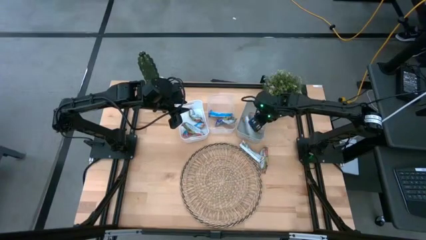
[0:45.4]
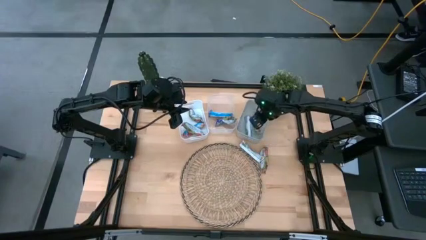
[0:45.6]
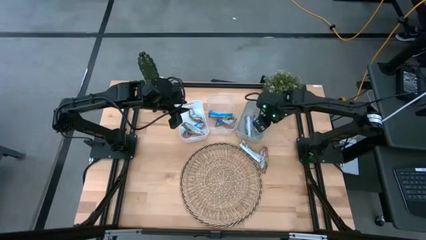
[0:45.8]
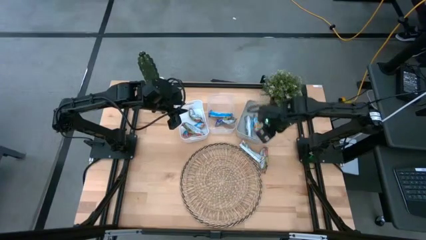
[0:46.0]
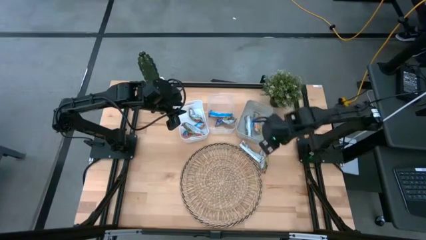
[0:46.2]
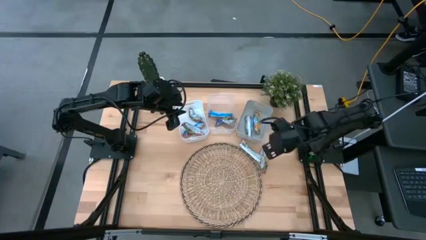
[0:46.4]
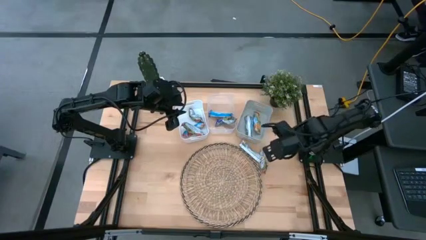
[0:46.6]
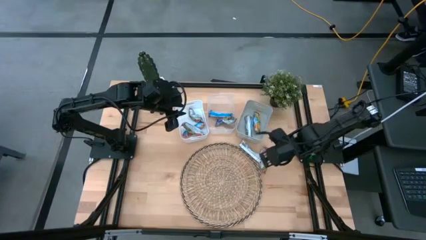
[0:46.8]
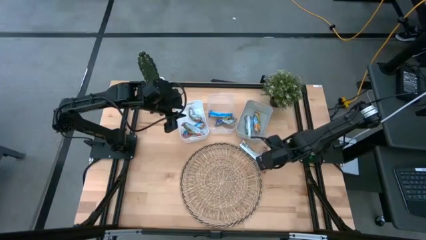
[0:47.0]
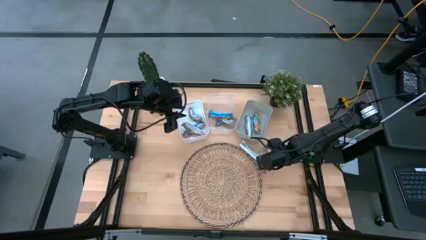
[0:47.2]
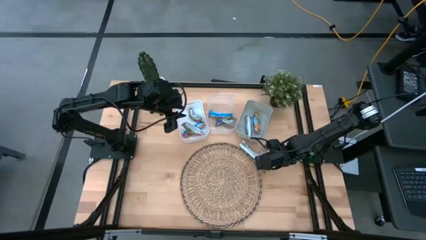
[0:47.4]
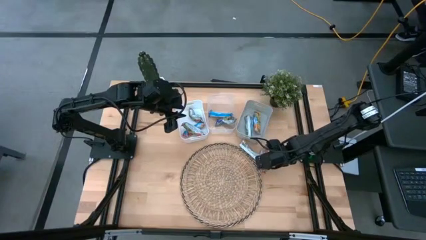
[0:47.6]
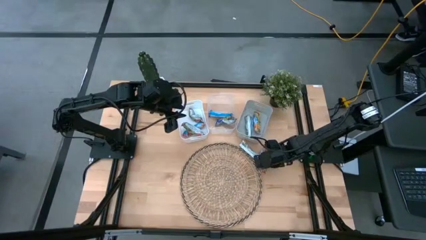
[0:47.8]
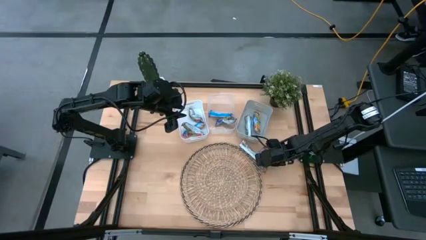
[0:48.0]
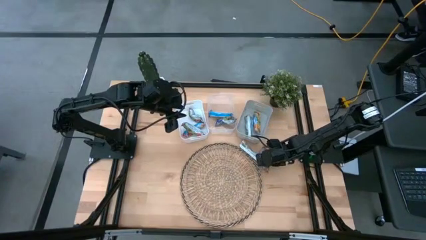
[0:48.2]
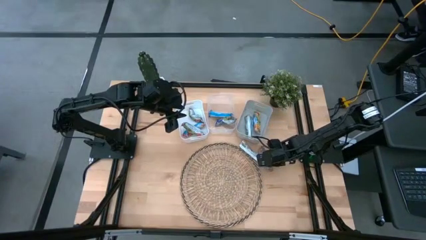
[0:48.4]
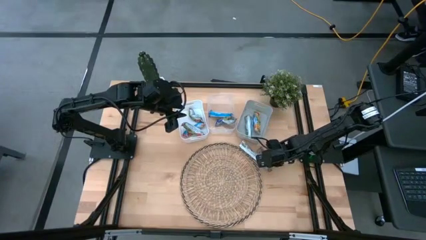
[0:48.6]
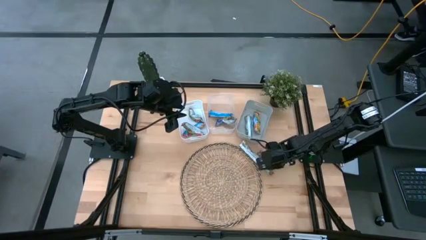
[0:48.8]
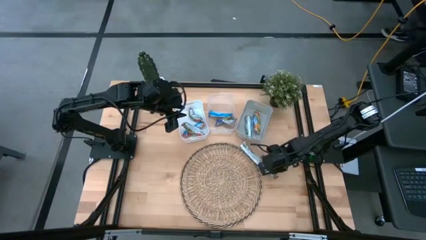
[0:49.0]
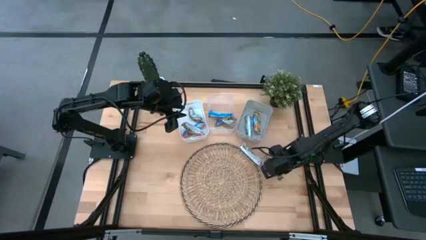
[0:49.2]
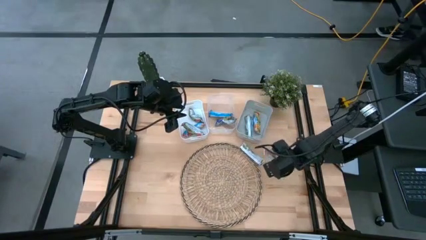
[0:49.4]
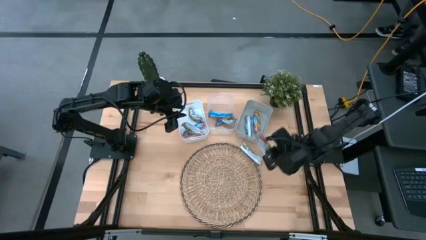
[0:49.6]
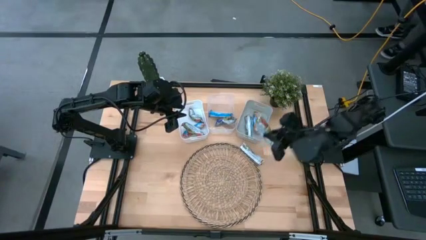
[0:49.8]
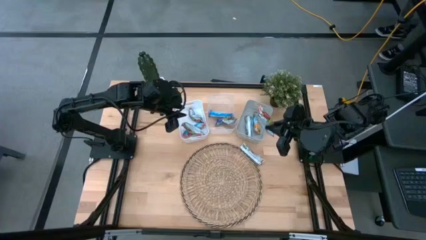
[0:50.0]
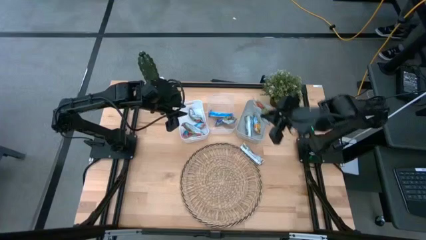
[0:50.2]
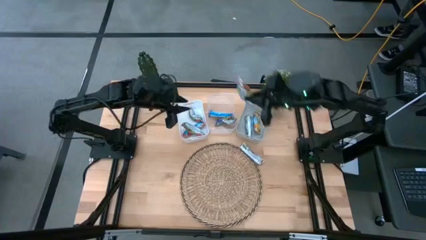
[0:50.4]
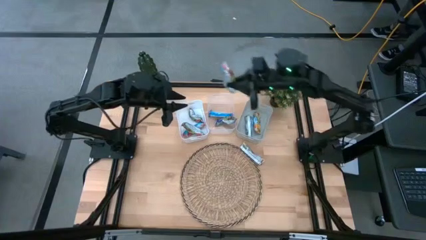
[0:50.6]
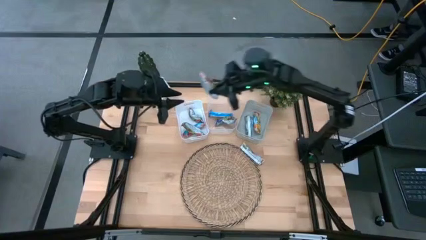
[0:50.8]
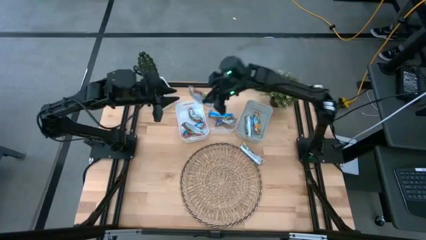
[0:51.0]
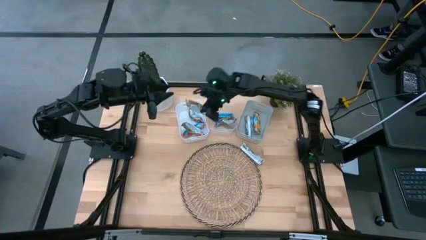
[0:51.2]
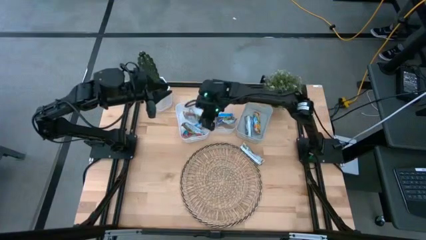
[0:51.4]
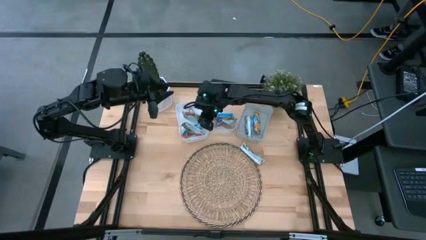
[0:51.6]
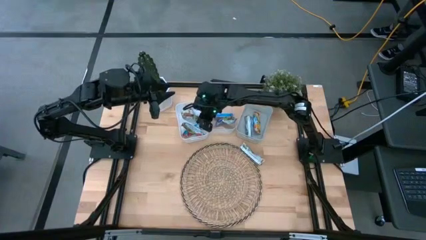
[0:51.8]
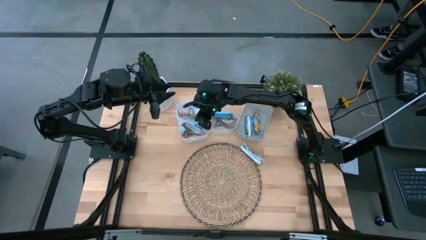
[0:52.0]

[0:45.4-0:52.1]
Task: Pick and place Granola Bars by type
Put the red granola bar into the white bin

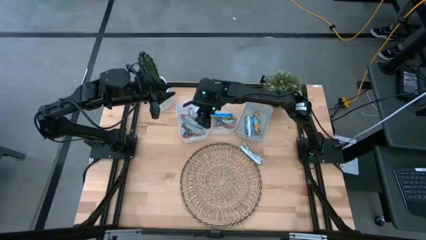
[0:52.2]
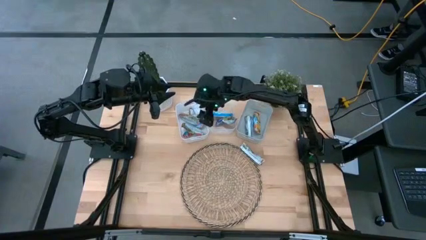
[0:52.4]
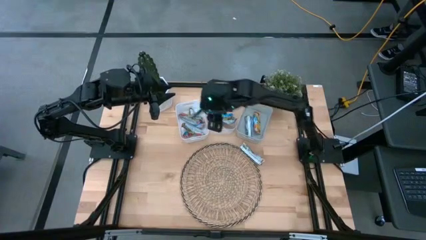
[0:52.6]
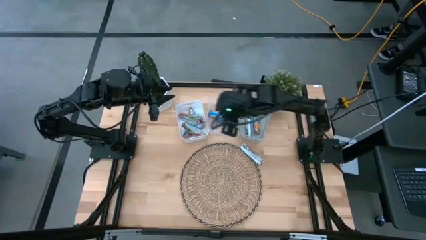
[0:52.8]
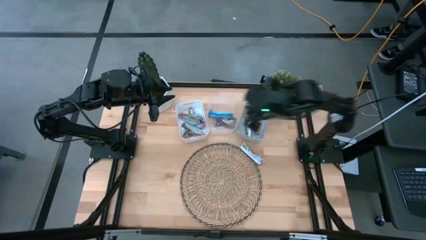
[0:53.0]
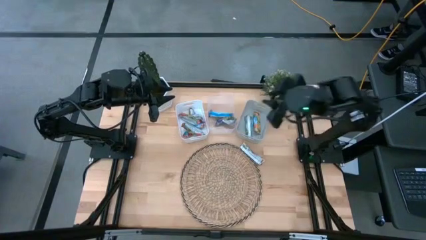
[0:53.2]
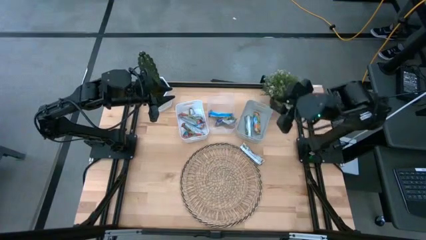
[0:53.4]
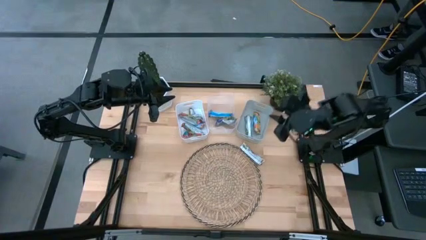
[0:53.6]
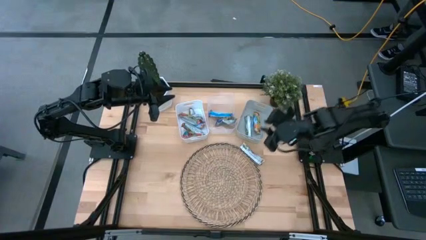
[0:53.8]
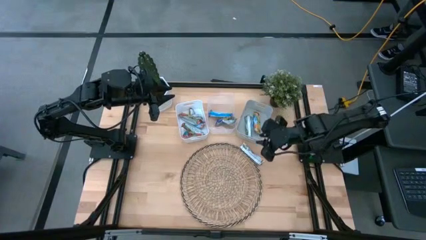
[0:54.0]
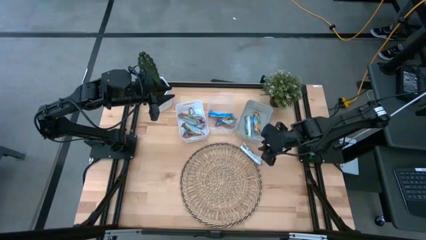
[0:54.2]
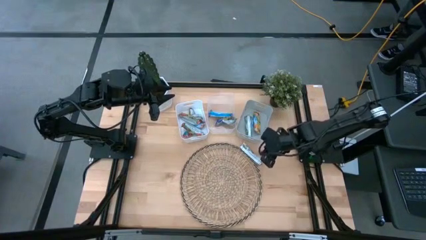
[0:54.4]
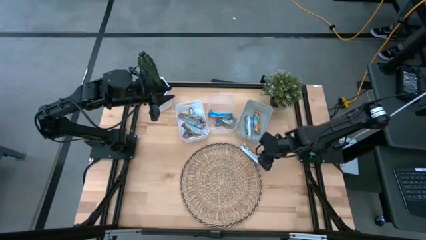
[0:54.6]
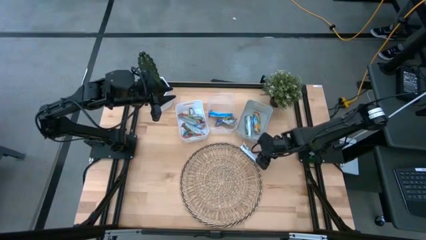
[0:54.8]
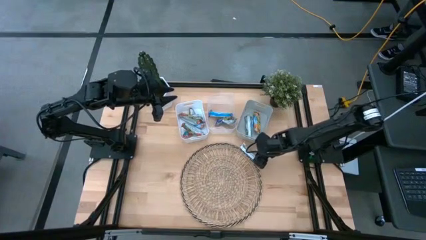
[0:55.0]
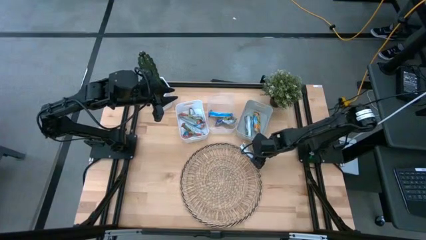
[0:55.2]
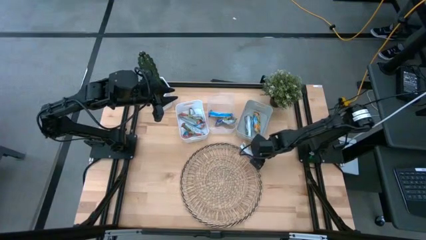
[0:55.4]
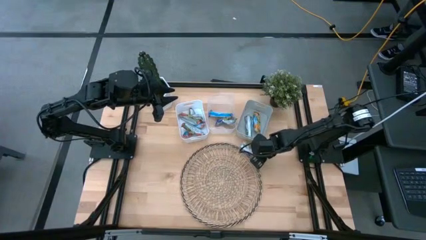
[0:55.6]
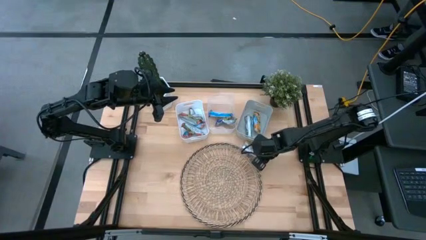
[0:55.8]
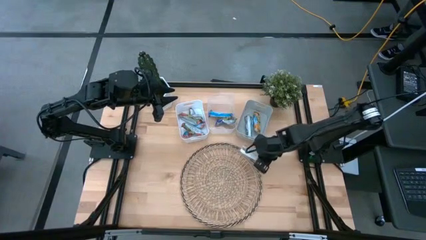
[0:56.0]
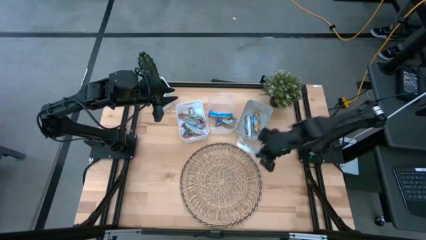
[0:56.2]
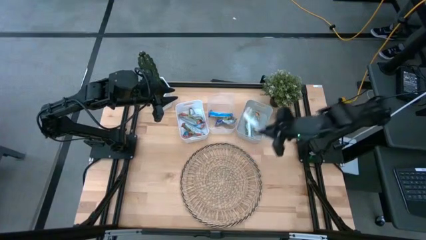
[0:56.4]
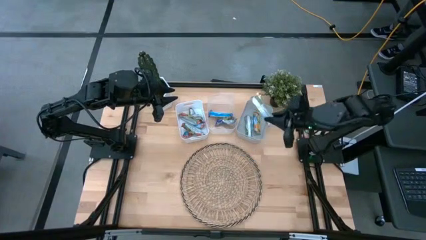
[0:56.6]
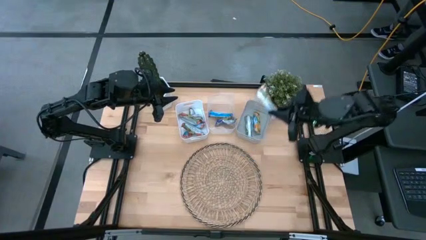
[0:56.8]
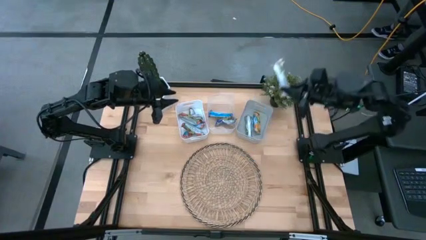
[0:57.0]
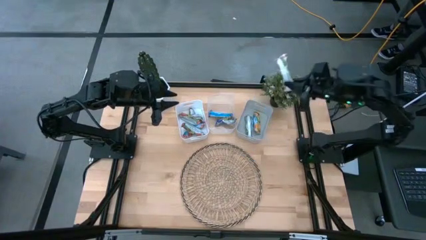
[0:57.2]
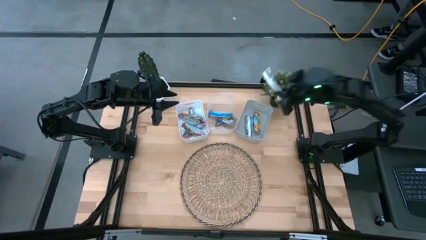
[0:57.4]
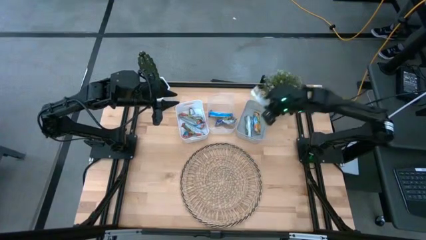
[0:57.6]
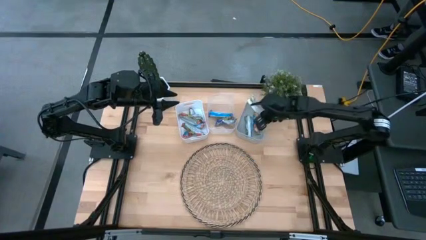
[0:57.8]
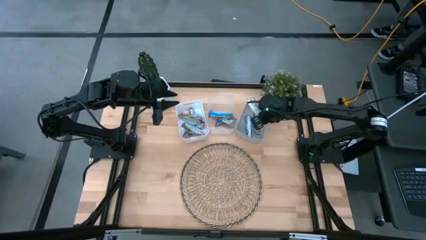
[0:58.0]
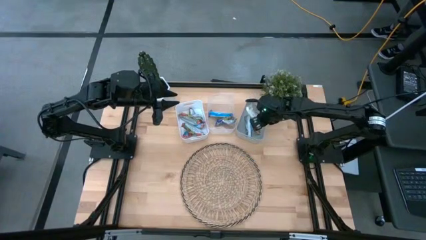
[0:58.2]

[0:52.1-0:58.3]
Put the yellow granola bar into the gray bin

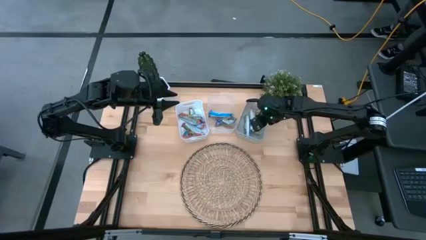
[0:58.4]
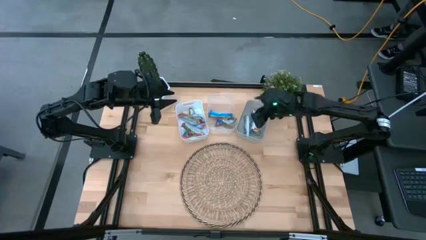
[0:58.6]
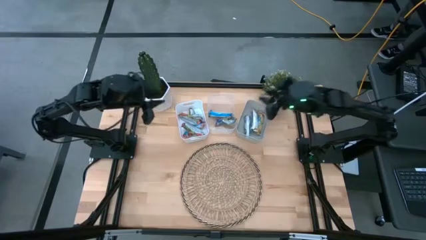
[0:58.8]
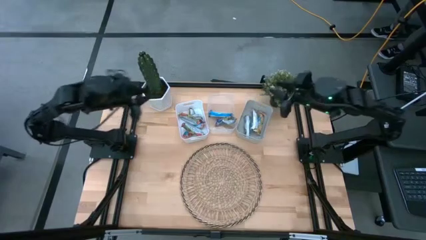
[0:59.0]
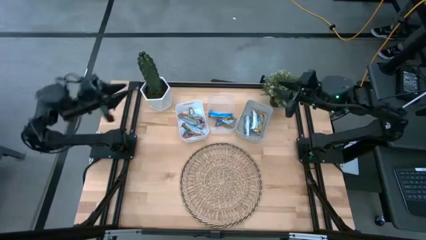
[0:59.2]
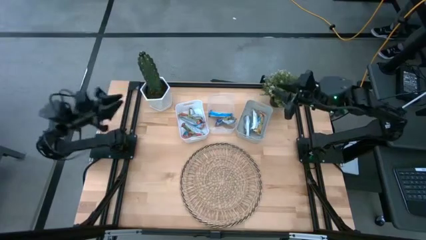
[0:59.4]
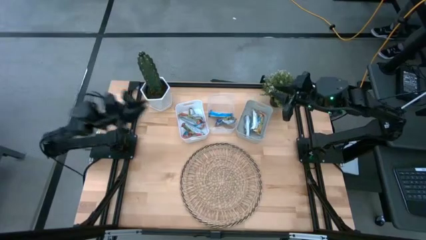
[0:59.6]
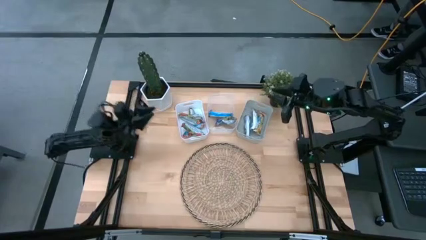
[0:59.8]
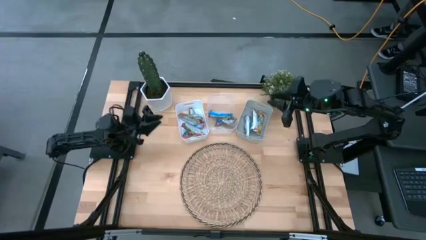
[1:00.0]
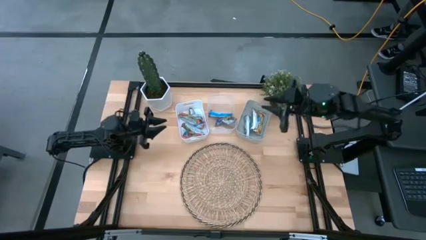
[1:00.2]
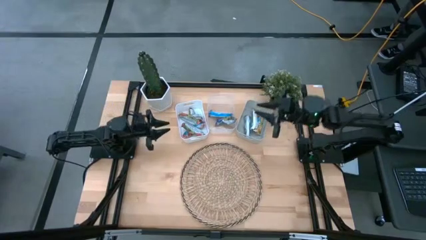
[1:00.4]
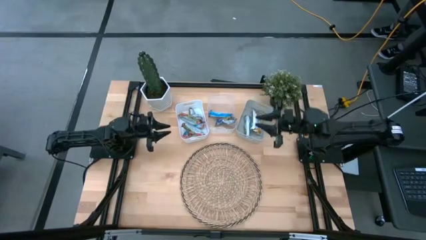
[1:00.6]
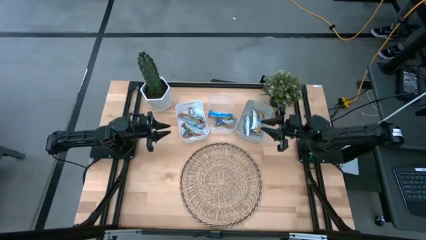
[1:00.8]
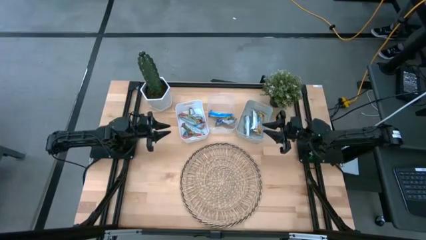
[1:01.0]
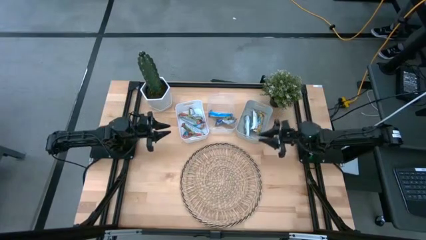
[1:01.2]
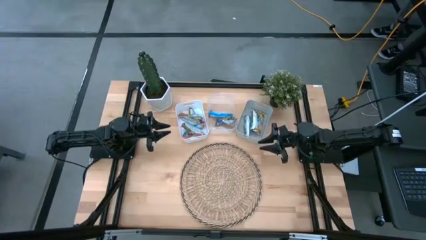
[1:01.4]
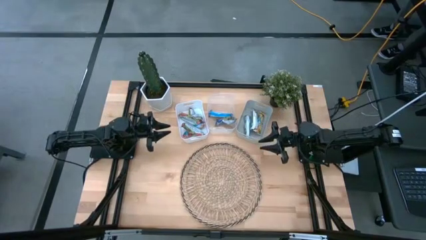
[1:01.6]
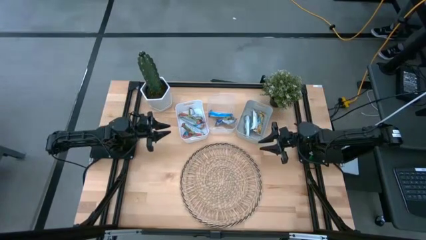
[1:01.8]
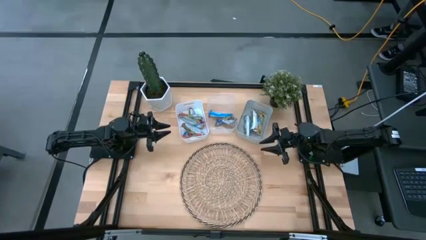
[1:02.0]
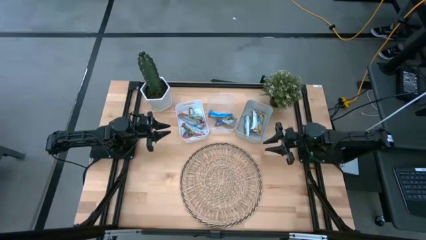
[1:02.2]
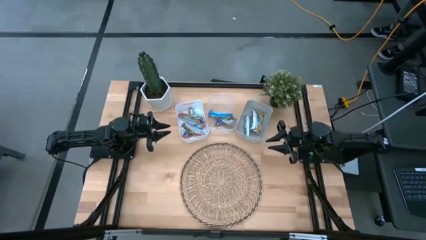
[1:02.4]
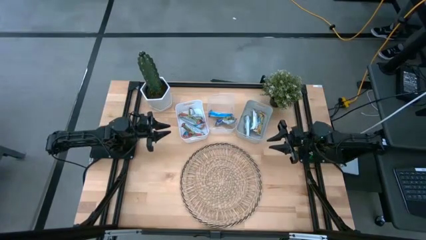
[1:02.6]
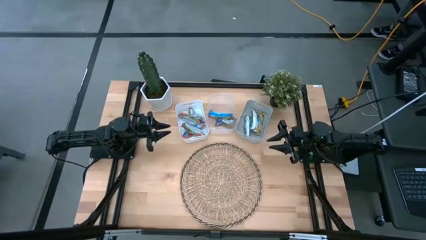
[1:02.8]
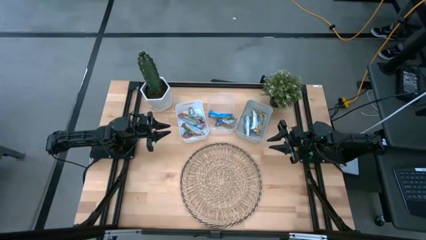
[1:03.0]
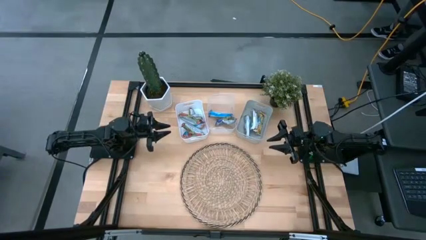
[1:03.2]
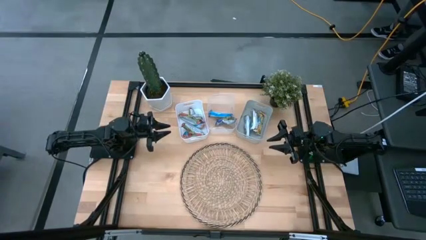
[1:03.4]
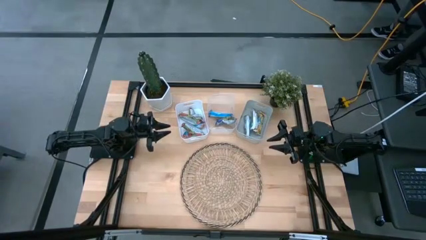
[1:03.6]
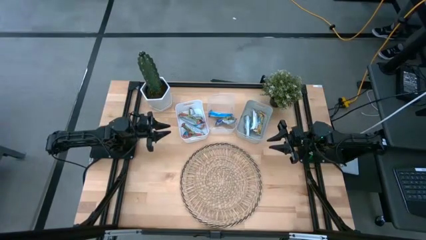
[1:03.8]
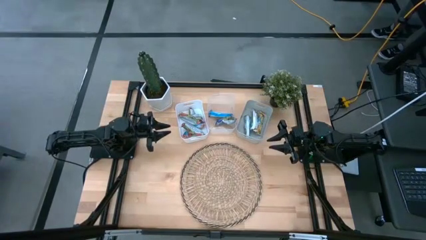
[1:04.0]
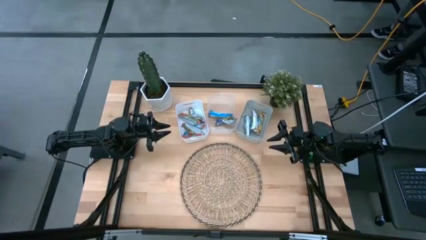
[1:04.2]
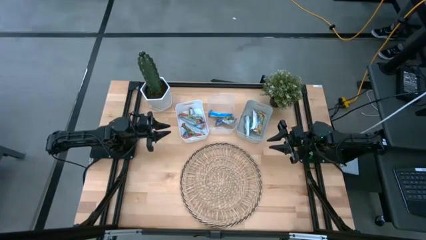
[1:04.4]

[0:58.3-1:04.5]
Return to Home Position
